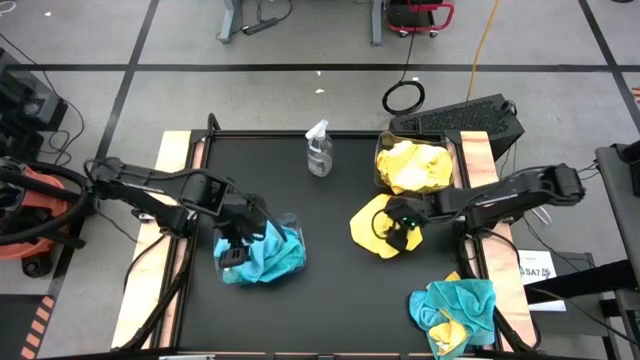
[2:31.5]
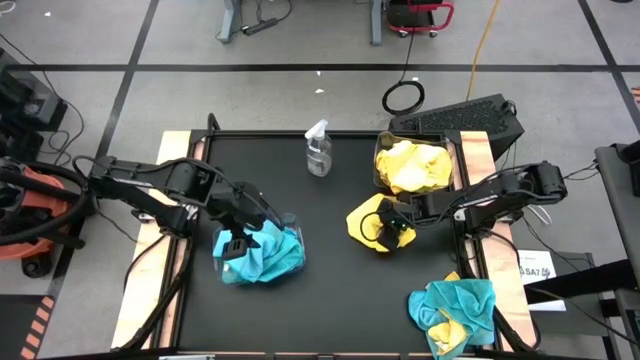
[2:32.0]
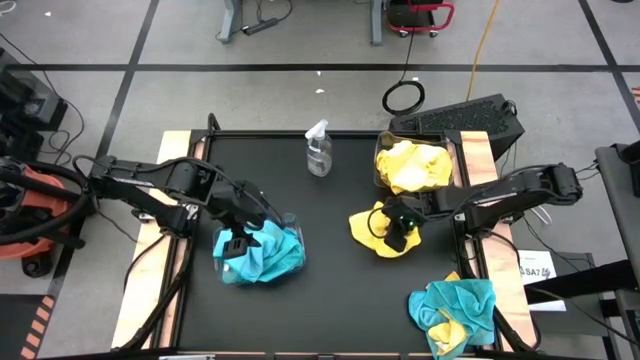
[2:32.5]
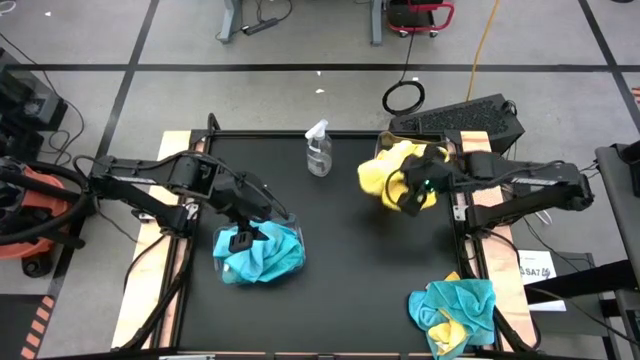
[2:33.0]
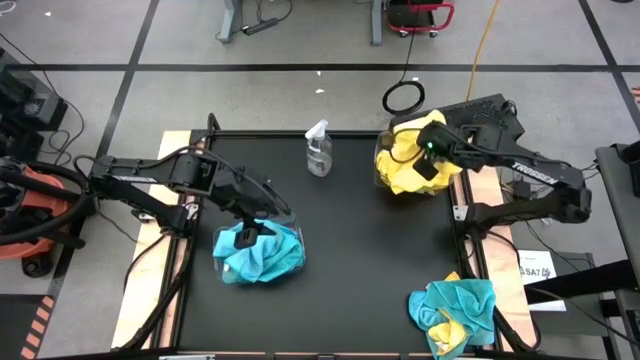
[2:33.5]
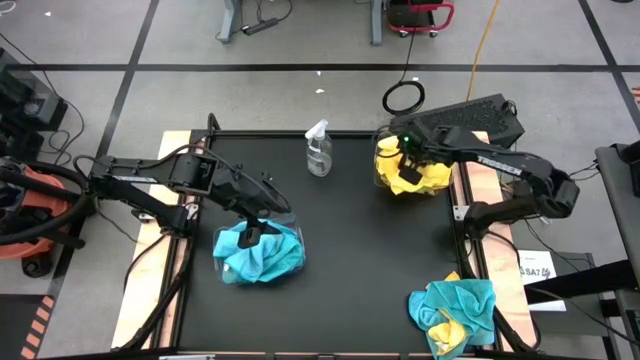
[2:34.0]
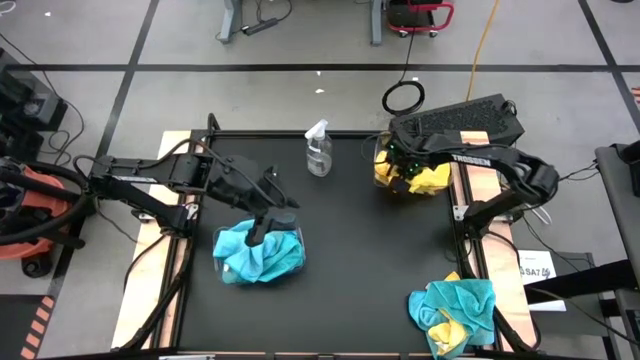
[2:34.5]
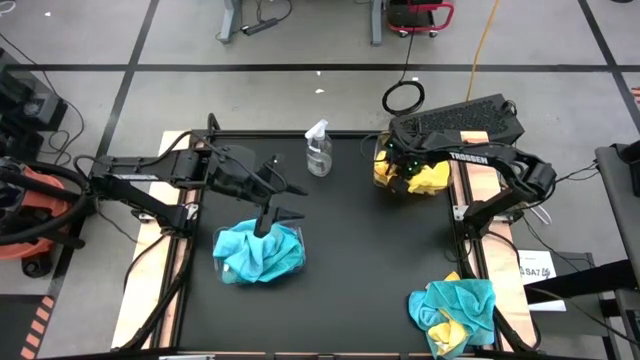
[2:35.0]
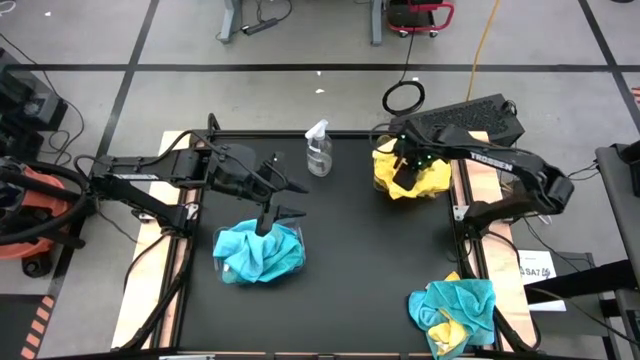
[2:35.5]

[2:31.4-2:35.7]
Task: Sort microfiber towel by color & place in baskets
Put the yellow towel into the top transparent bin

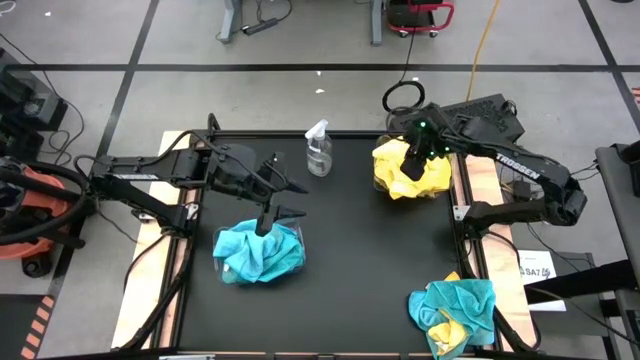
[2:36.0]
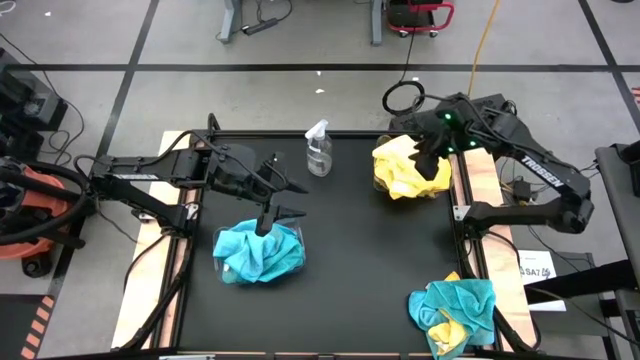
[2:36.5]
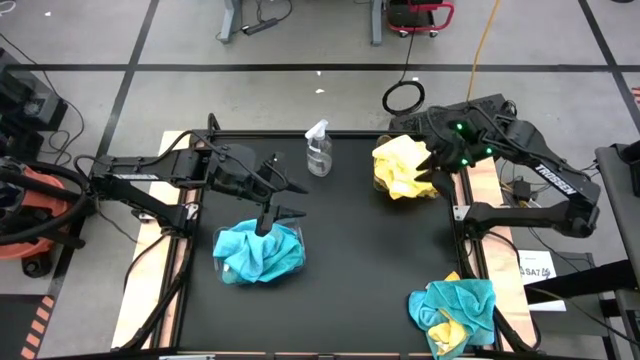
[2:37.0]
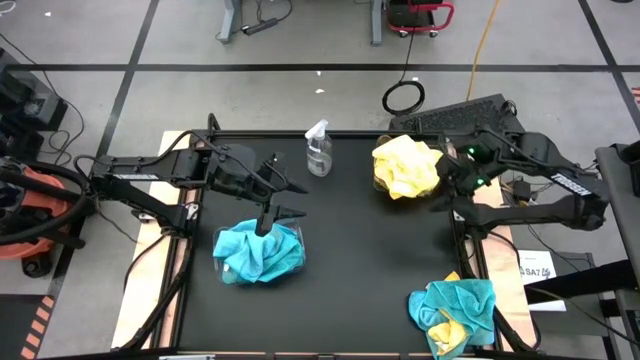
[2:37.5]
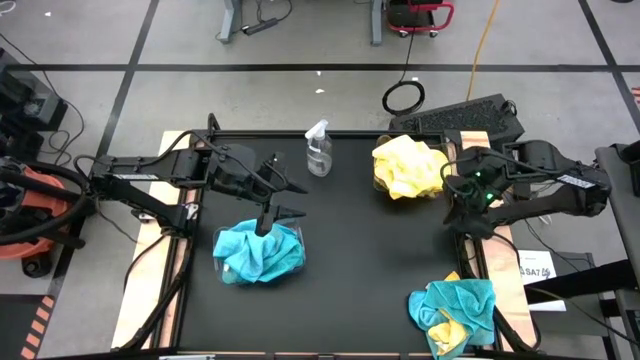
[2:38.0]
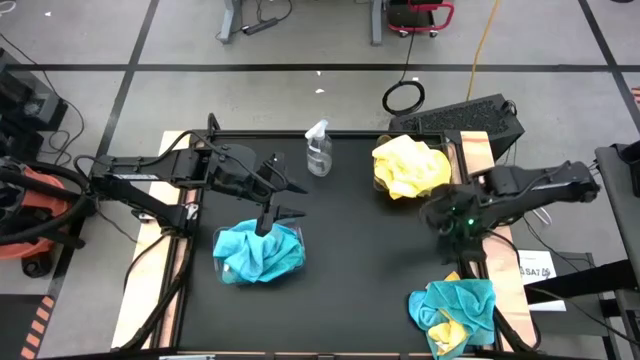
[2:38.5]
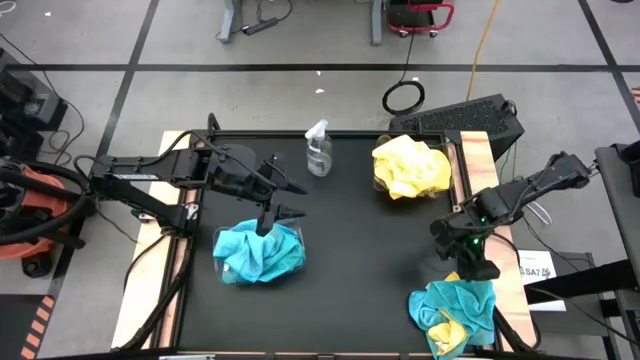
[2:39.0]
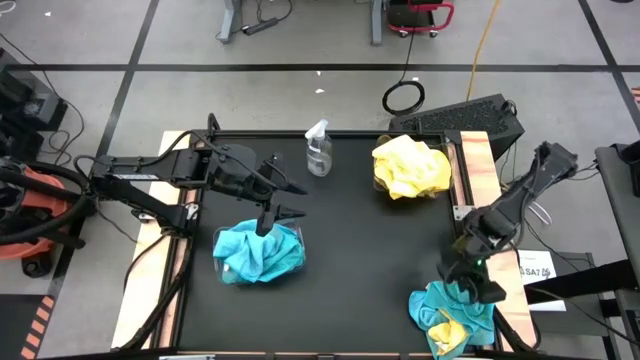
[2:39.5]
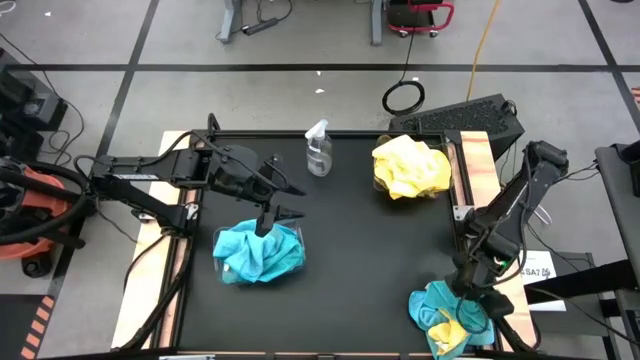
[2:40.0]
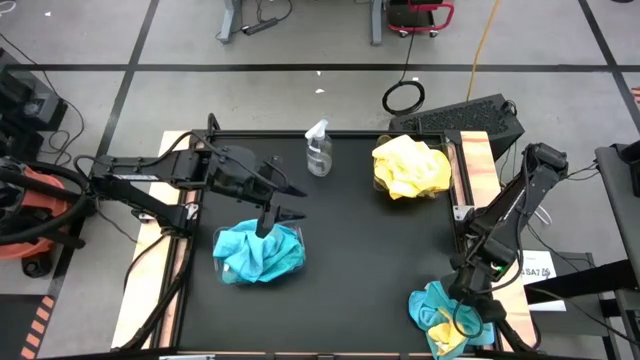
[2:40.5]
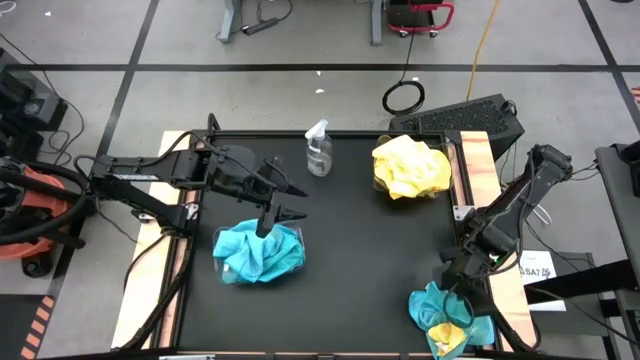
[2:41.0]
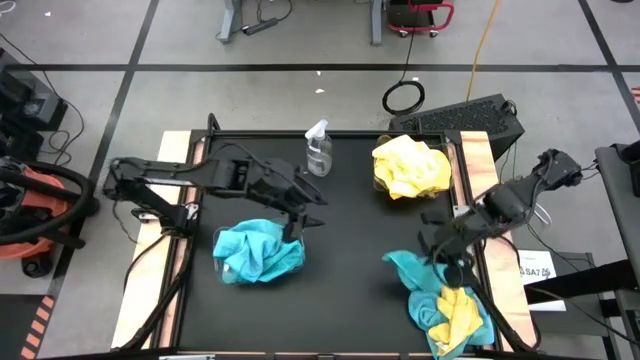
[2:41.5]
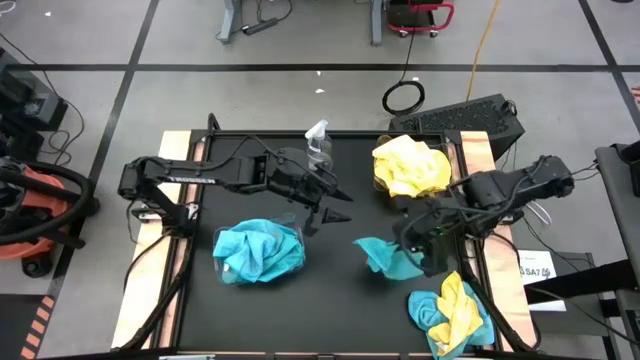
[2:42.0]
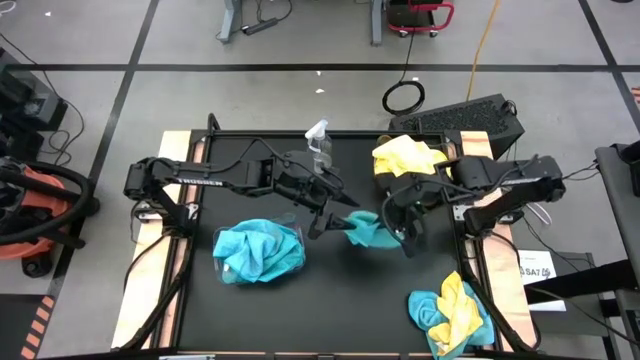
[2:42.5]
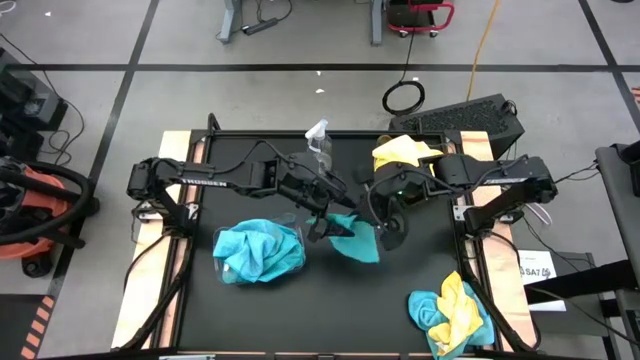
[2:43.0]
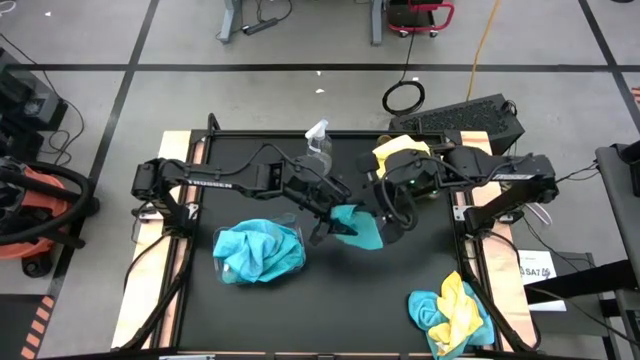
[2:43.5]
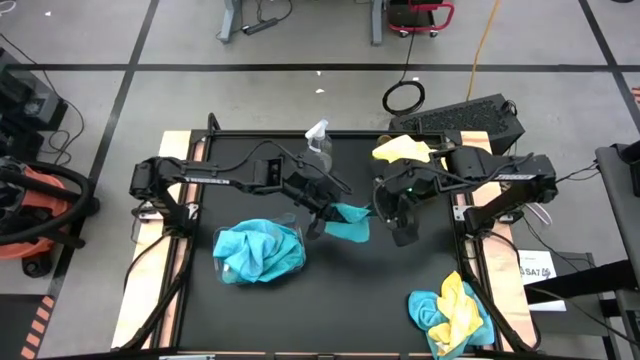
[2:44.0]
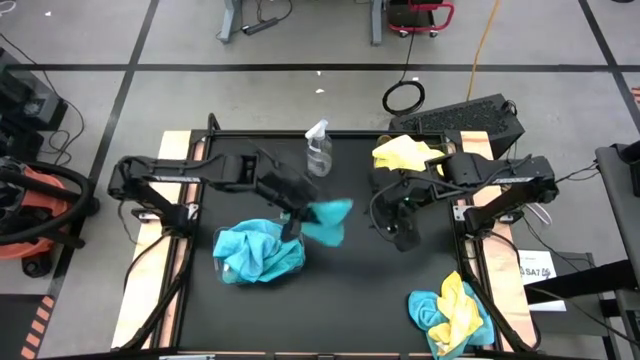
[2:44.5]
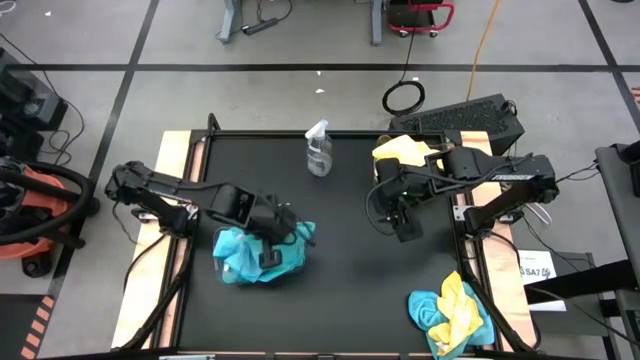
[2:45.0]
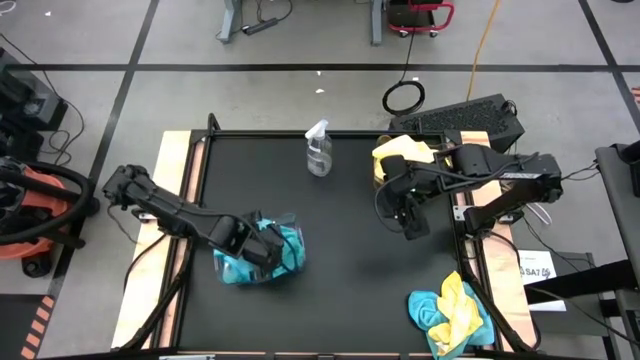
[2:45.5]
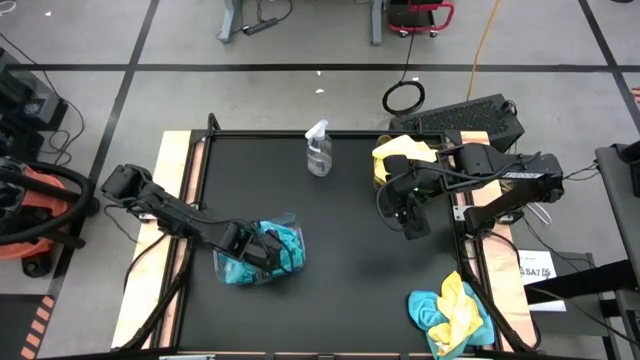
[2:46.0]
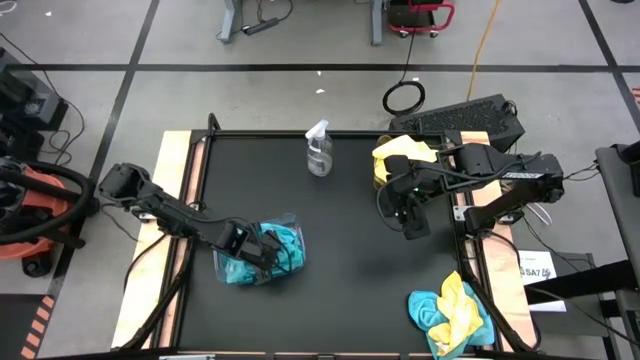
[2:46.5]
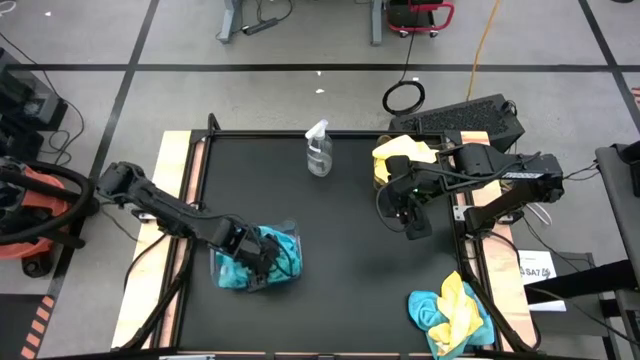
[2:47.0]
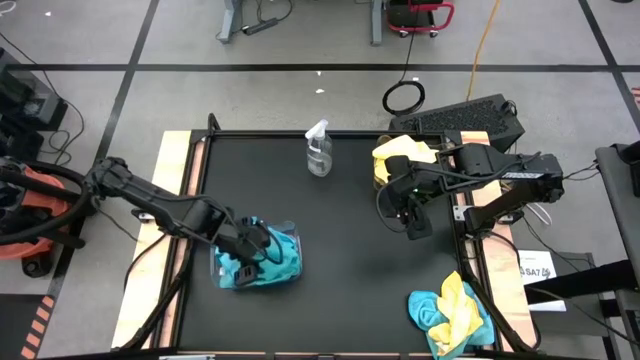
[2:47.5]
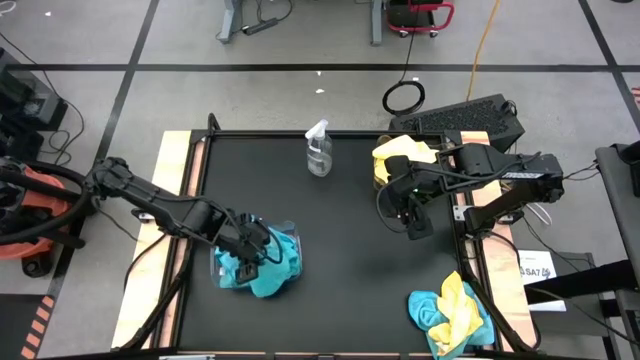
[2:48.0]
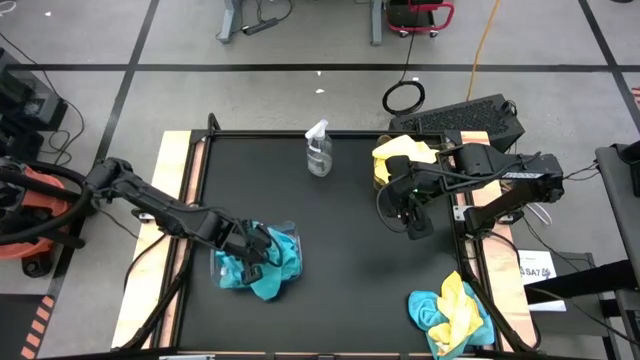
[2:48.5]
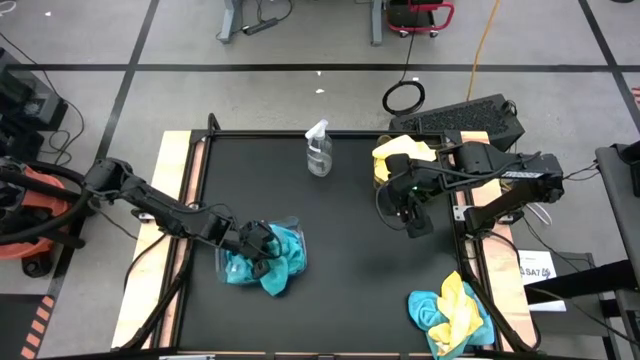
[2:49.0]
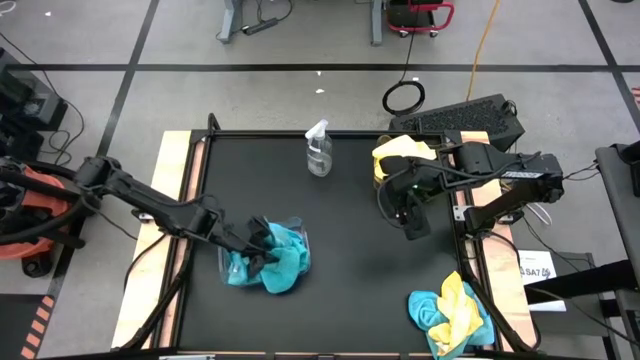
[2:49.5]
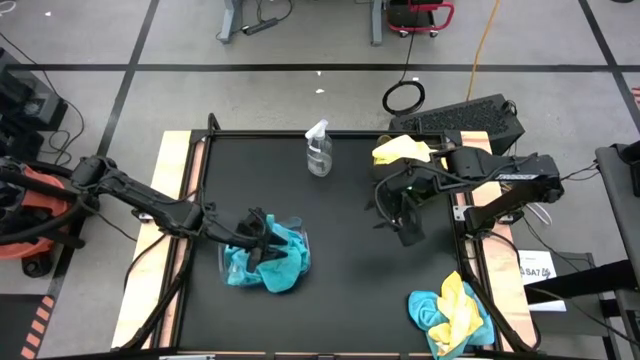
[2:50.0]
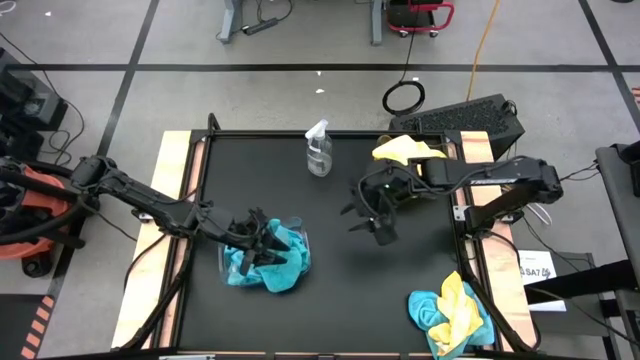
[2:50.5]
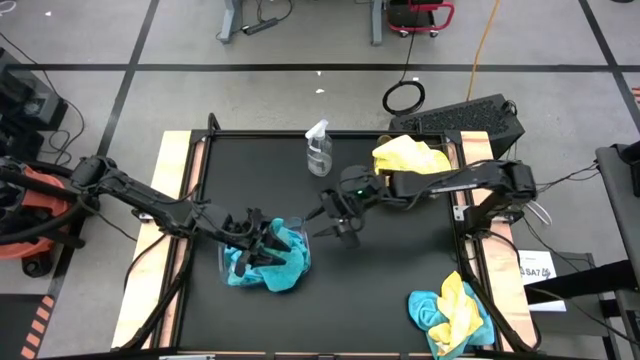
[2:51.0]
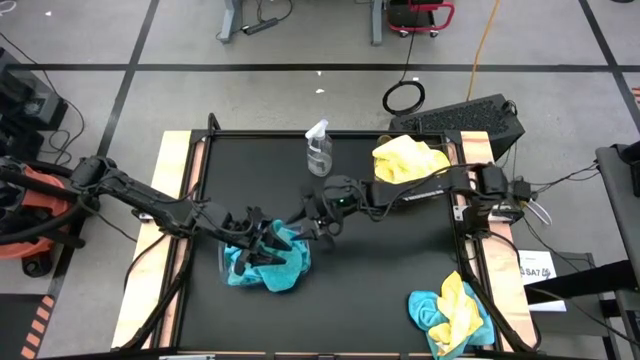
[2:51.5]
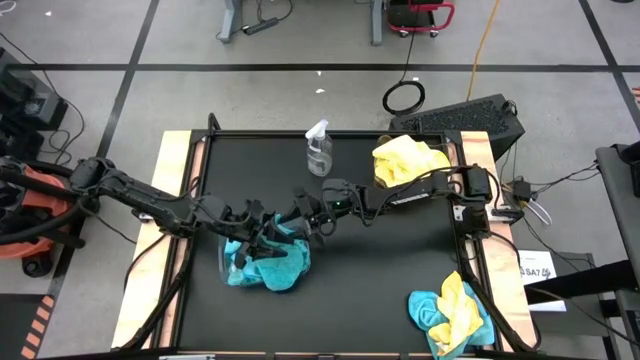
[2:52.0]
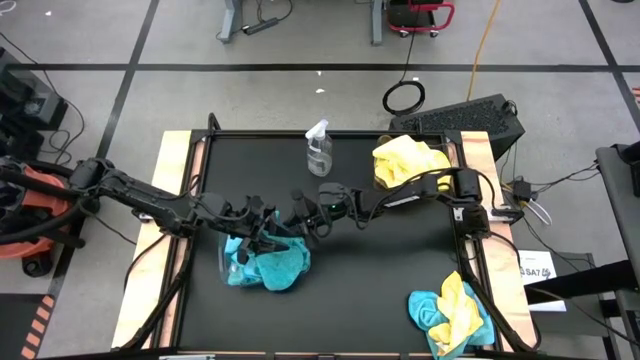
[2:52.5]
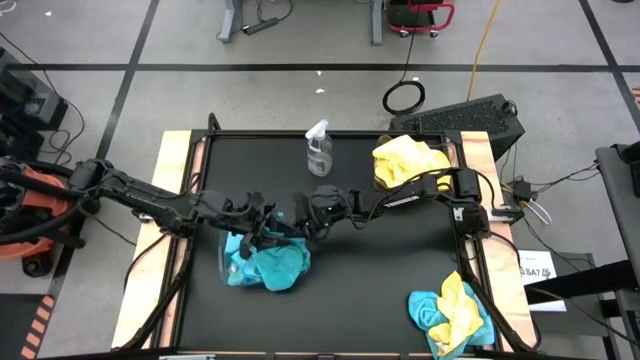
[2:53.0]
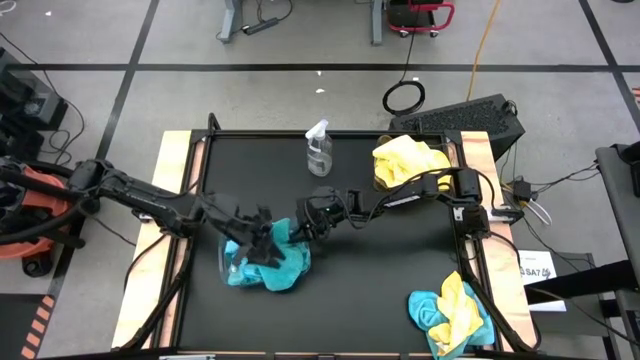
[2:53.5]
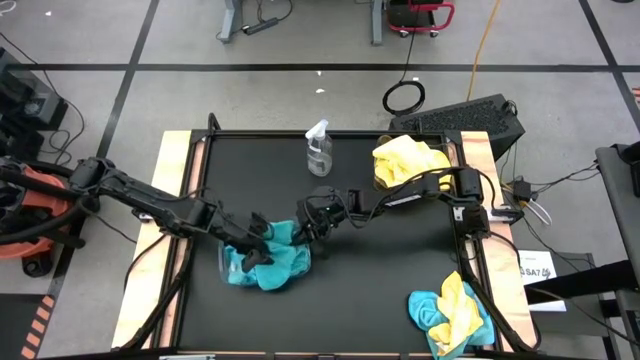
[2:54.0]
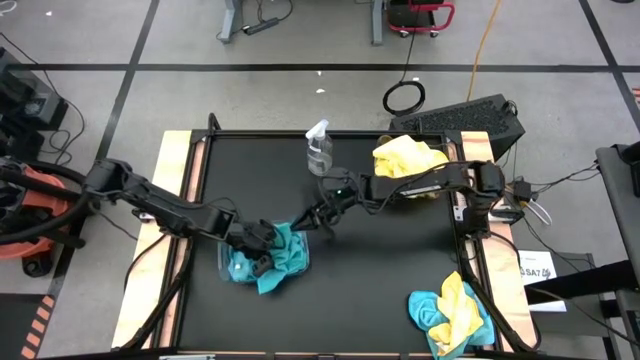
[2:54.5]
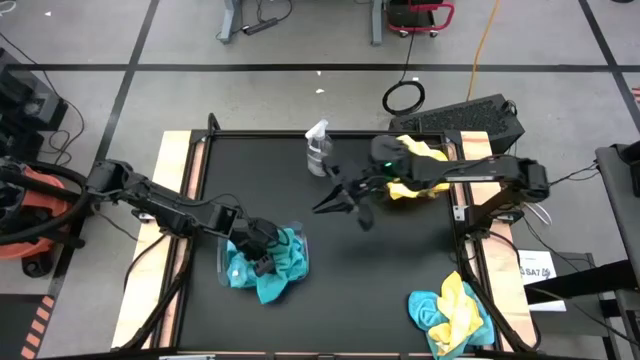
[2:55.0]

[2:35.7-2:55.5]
Put the blue towel into the bottom transparent bin
